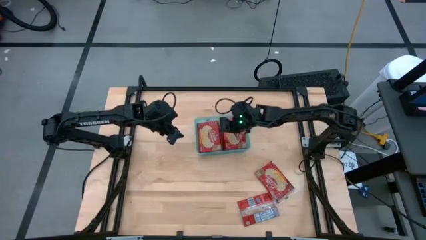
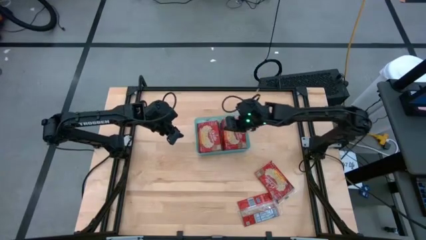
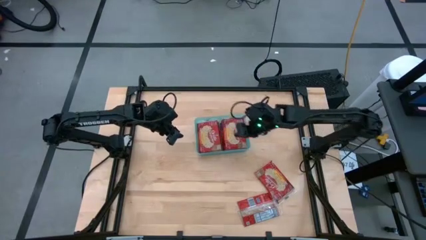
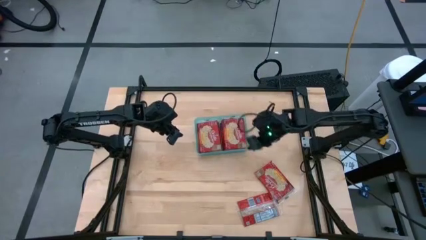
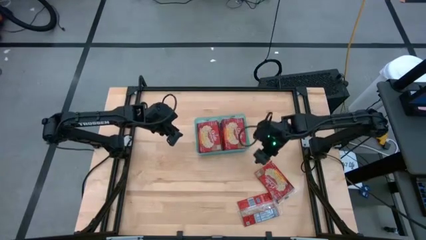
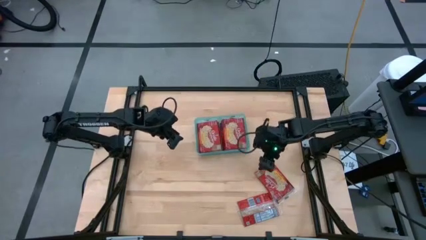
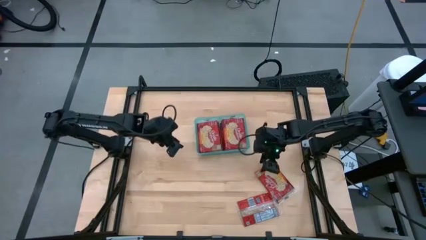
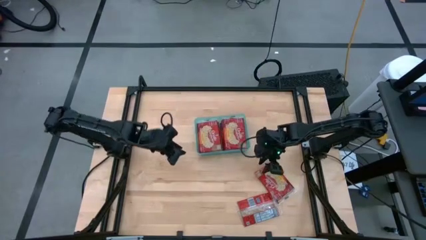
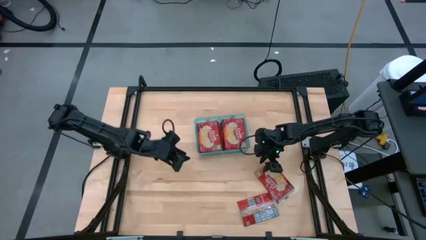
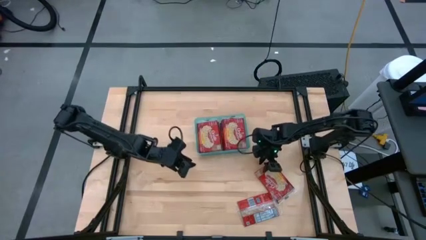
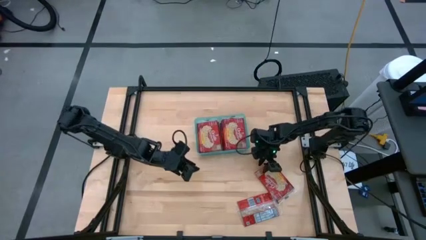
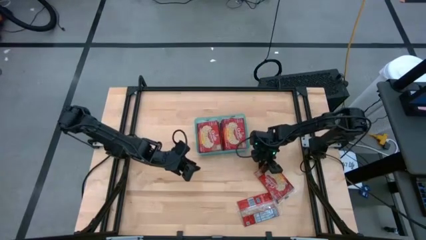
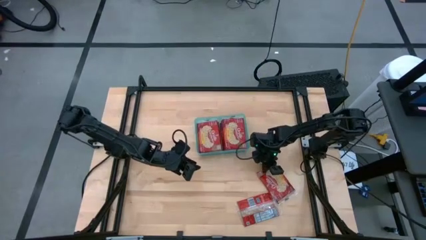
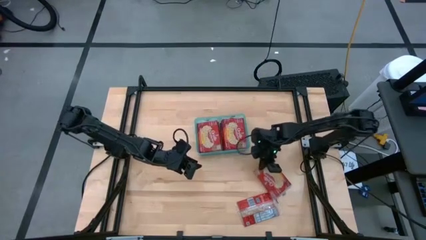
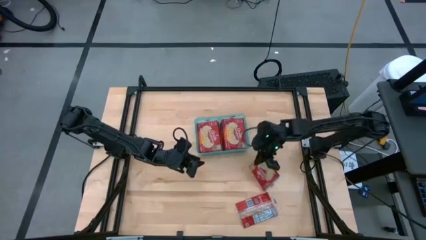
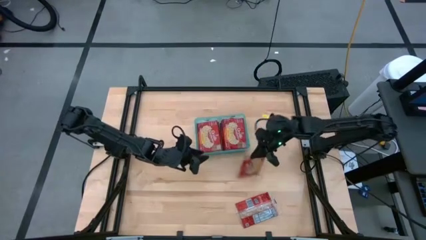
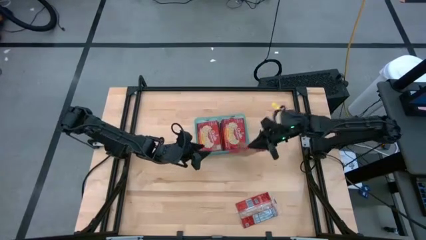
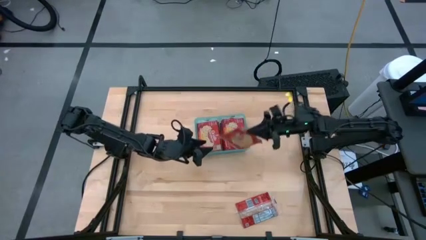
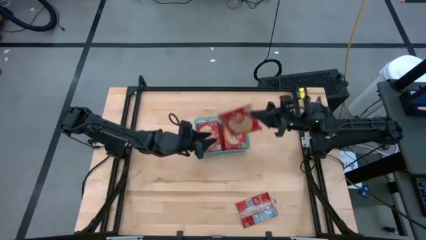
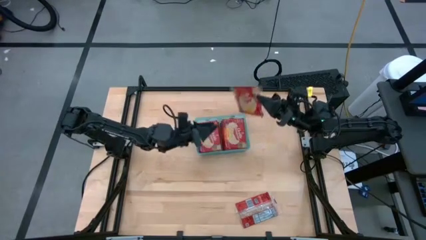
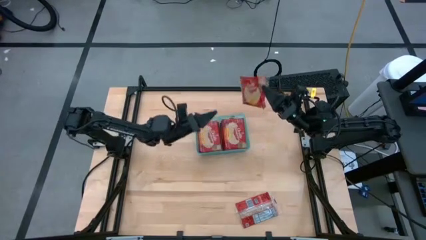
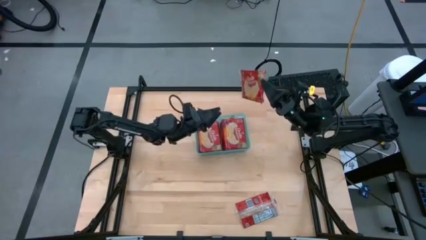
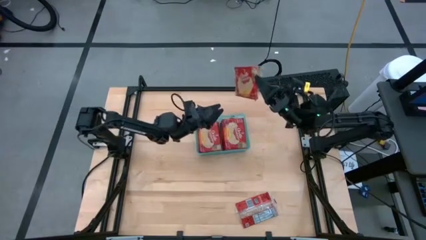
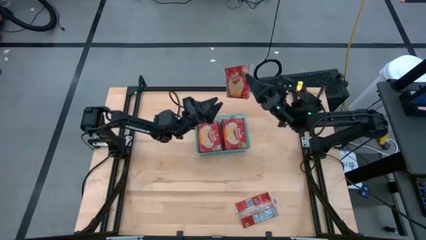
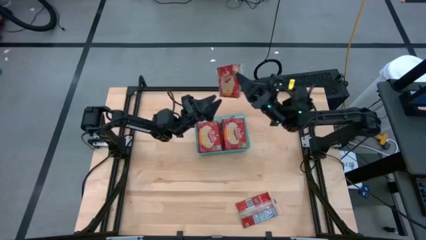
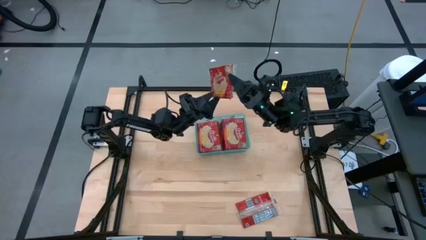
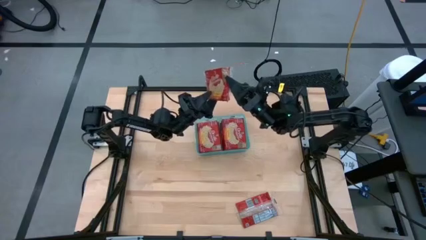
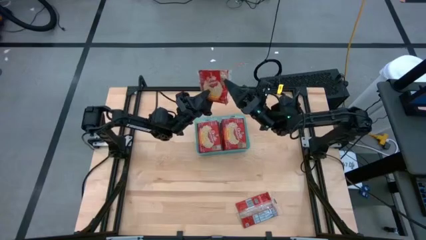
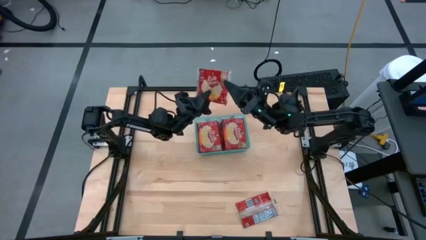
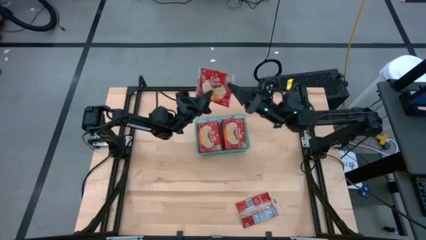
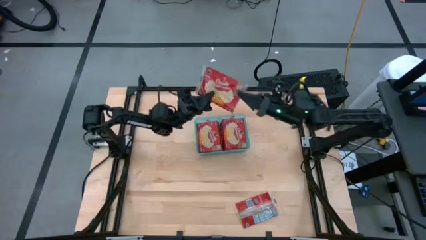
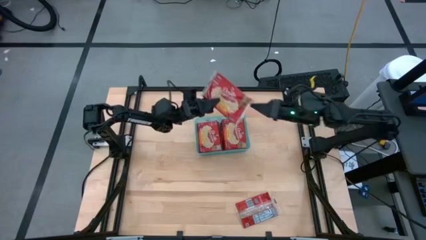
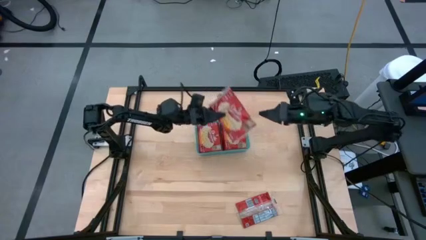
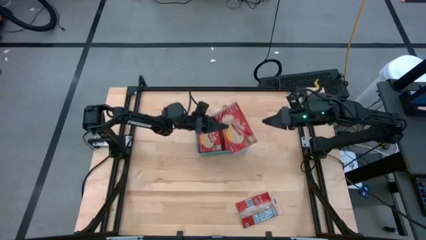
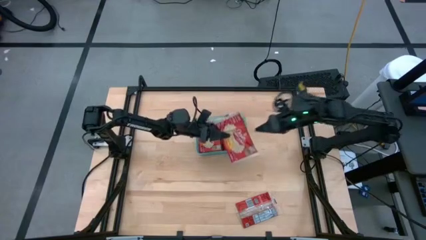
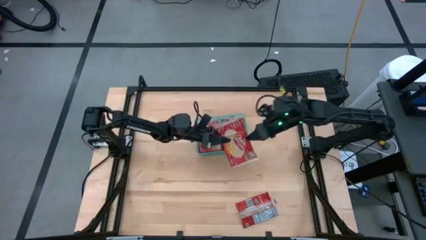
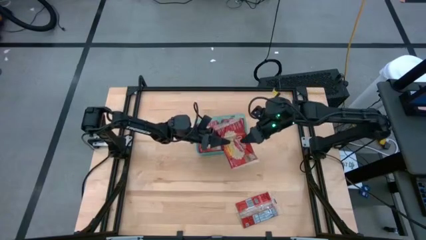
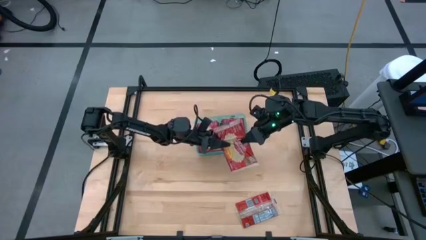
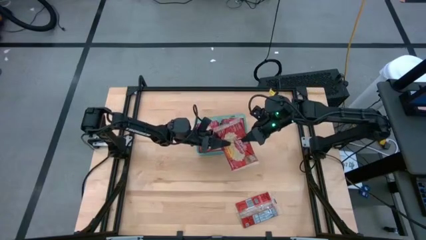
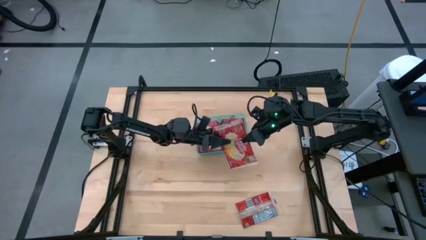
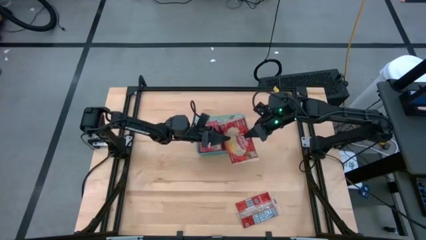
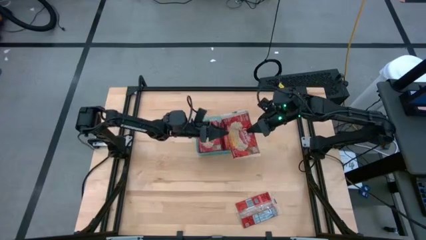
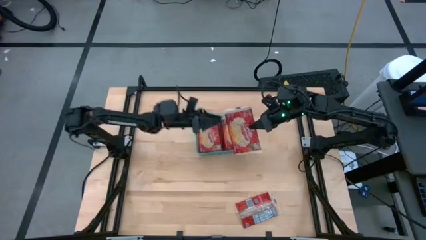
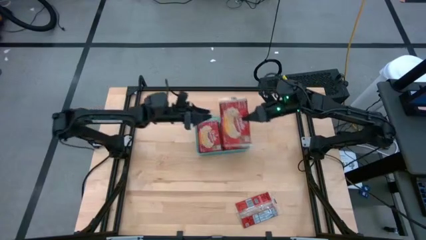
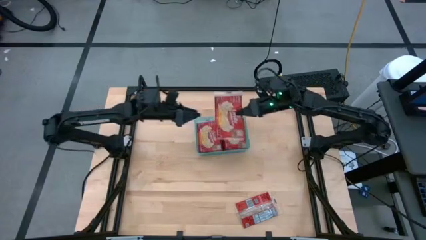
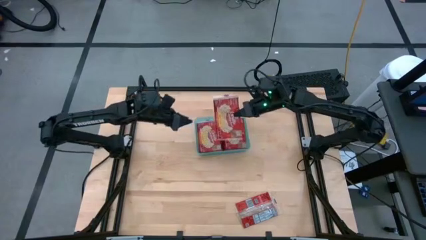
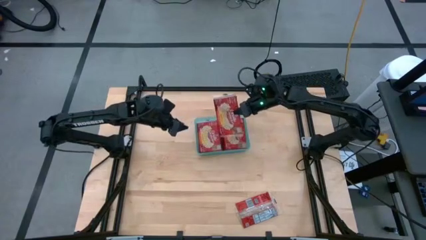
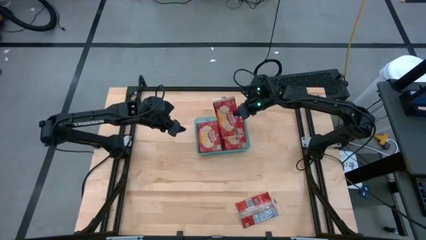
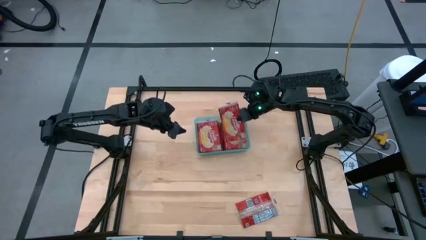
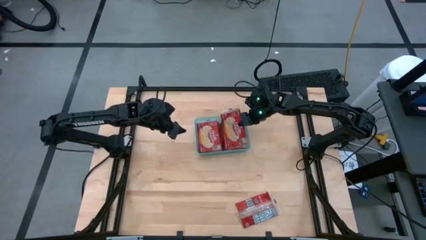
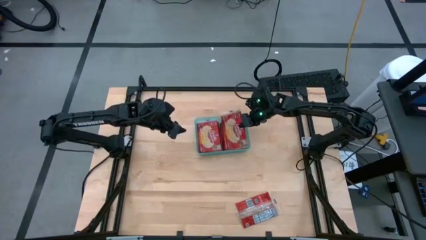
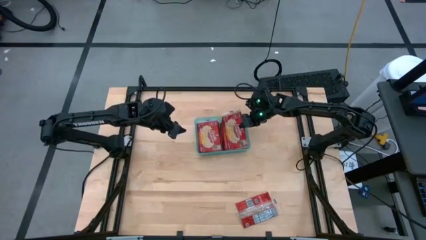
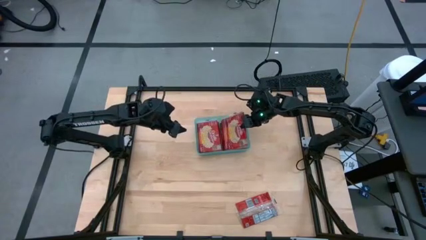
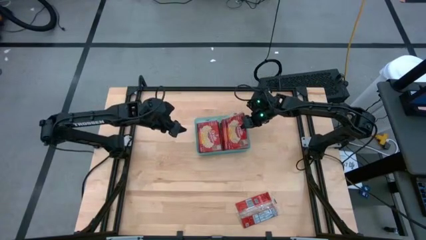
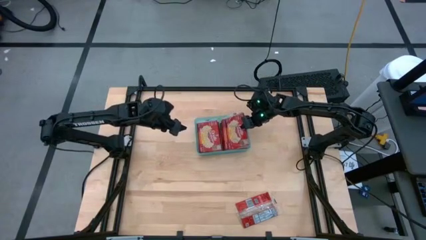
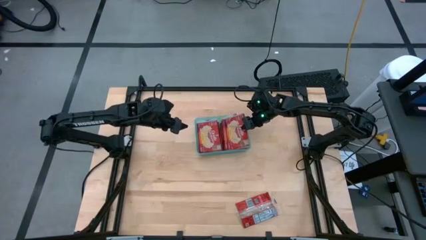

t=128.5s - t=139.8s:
Task: Sort popcorn bags into baskets
Put the red popcorn bag into the green bin

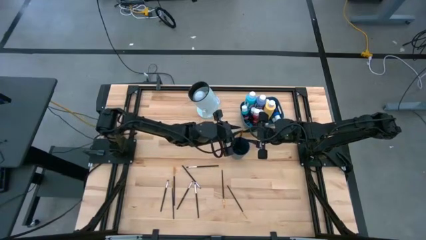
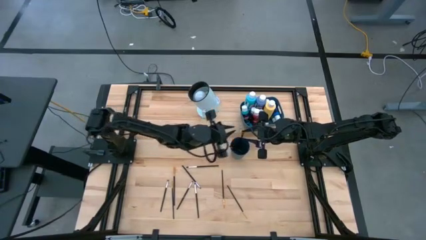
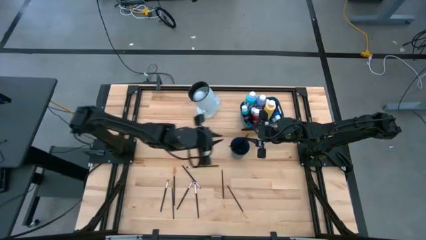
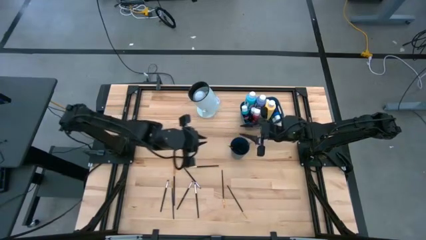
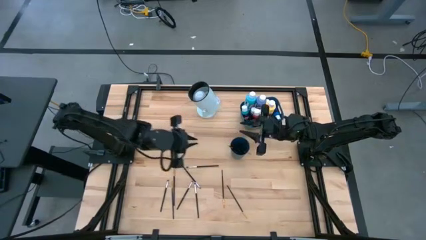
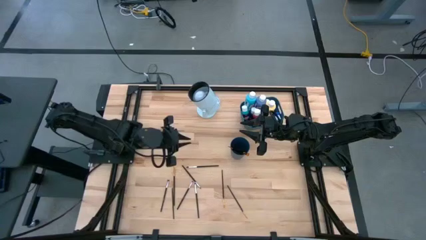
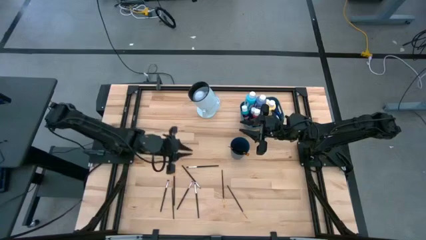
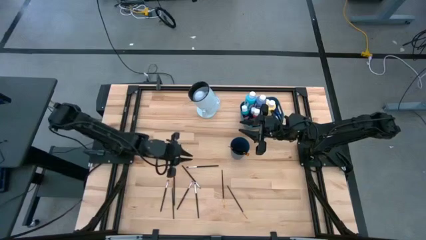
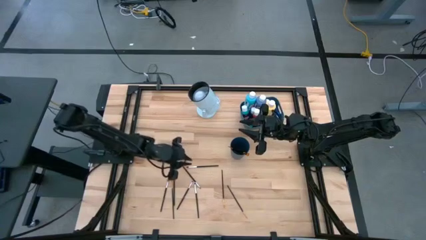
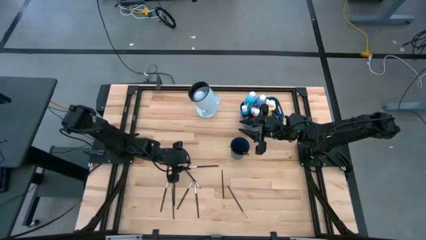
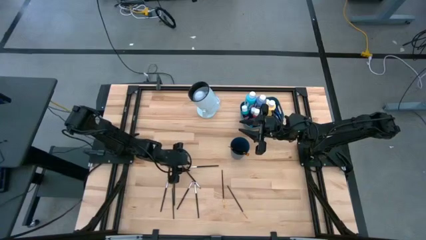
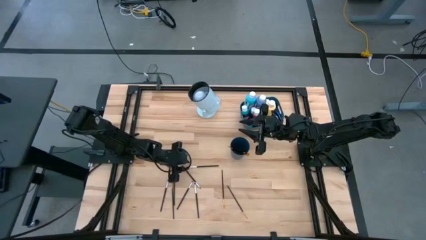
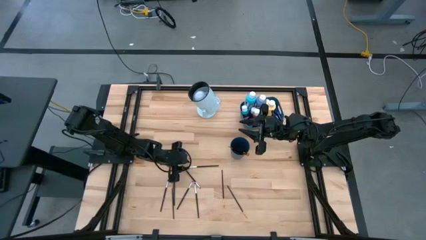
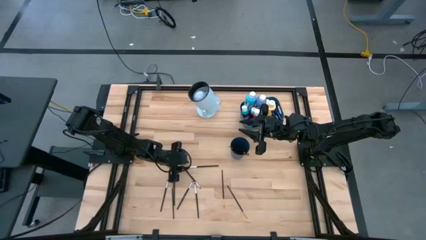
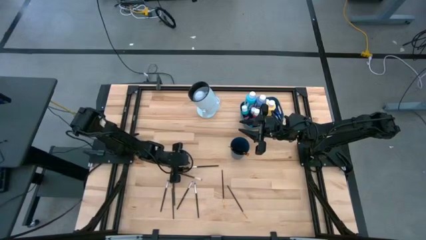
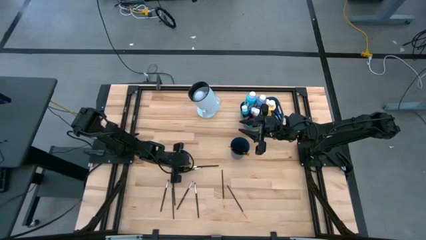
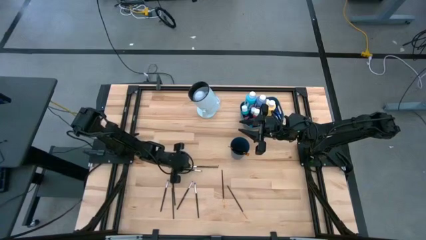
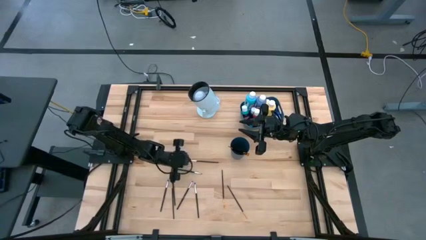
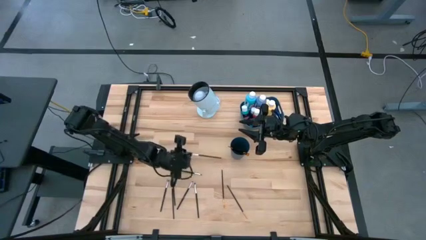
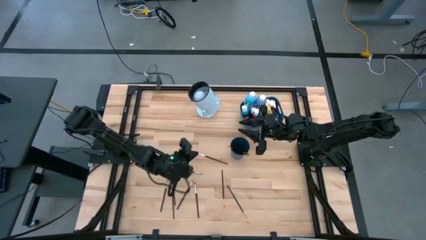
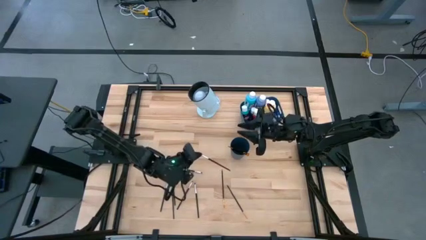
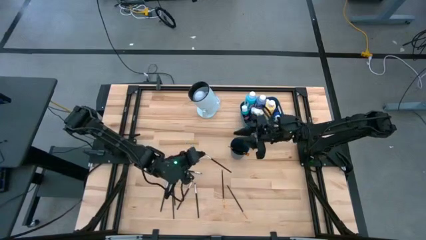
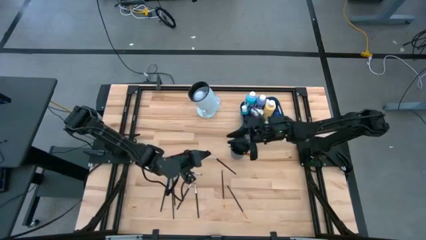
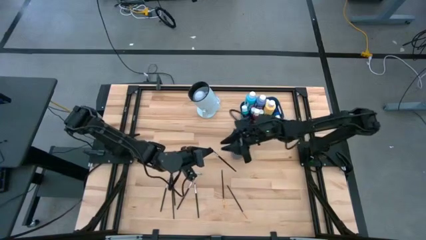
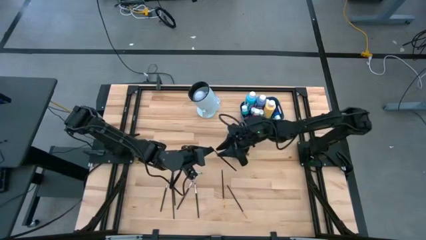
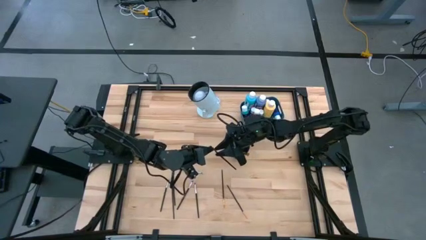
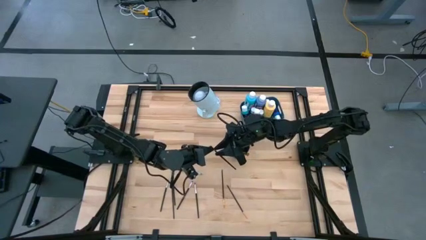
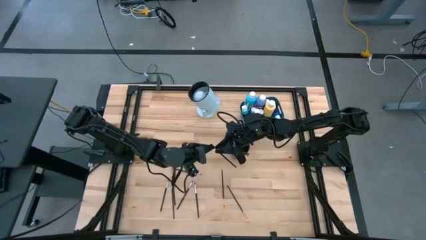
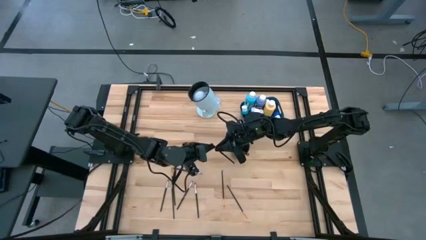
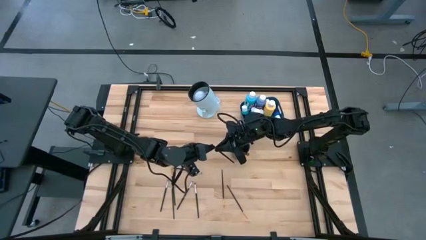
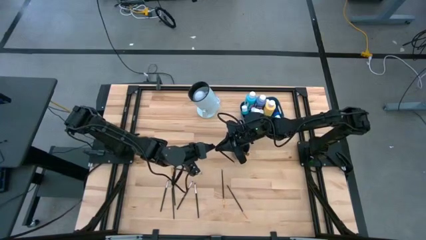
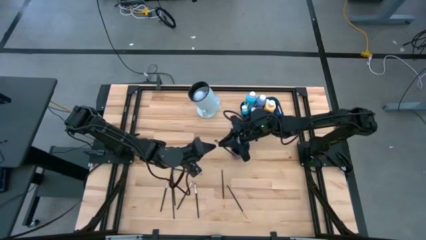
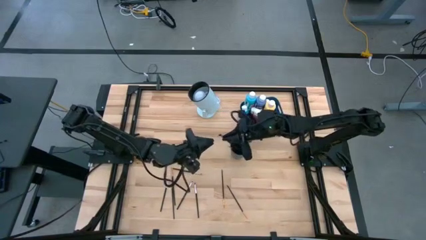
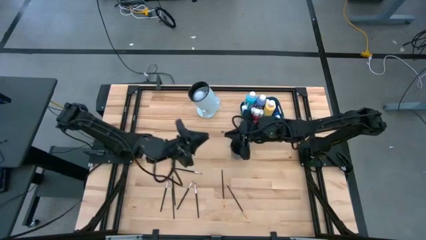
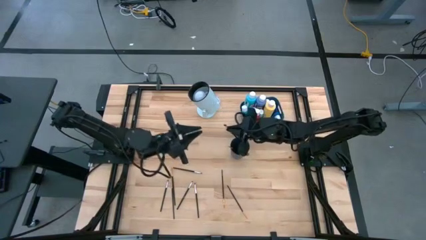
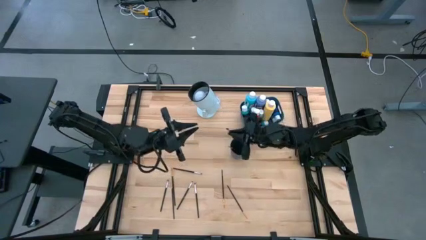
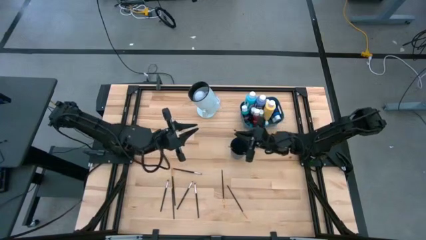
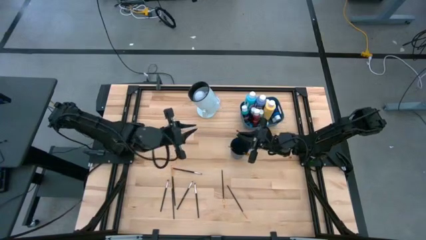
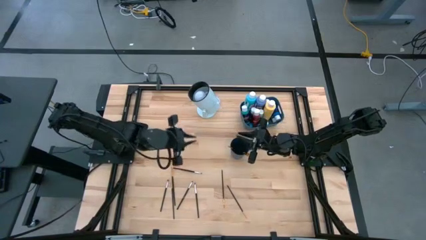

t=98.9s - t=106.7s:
Task: Pick & Place Paint Supplies
Put the silver paintbrush into the blue cup
